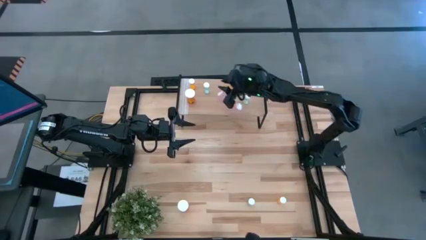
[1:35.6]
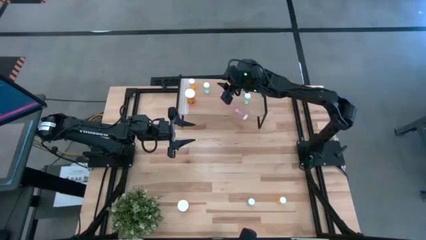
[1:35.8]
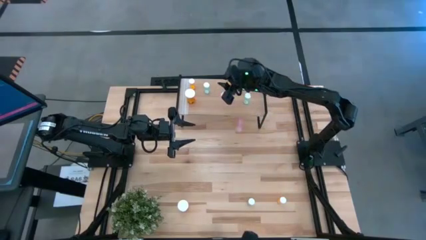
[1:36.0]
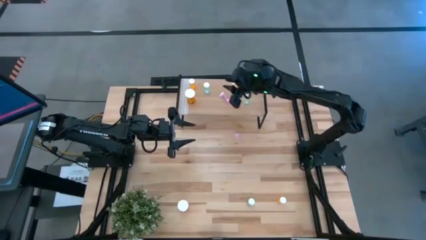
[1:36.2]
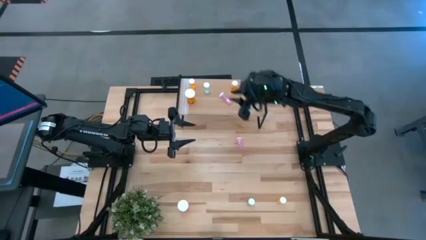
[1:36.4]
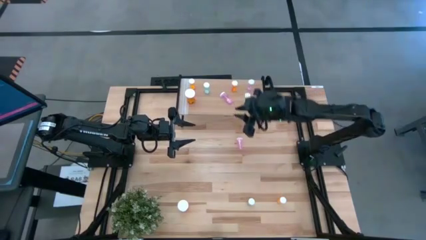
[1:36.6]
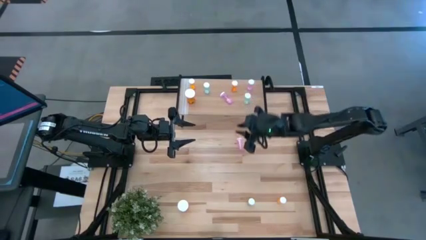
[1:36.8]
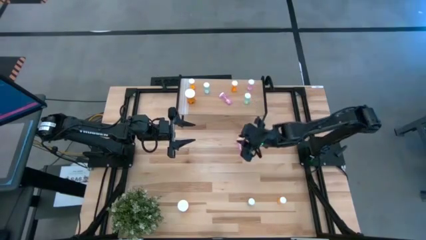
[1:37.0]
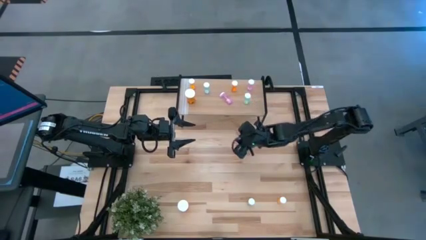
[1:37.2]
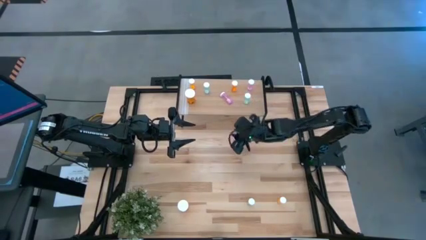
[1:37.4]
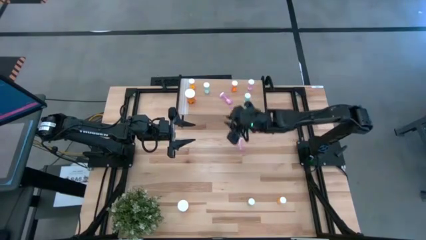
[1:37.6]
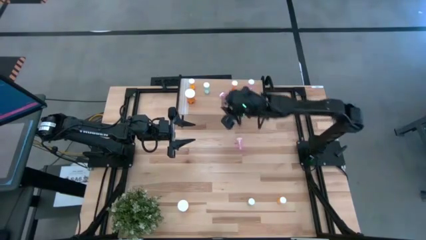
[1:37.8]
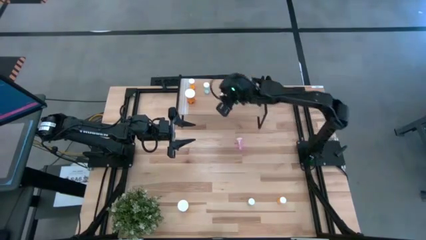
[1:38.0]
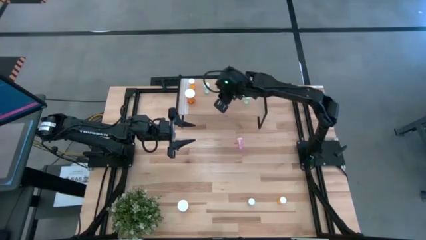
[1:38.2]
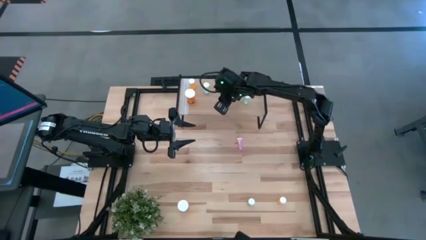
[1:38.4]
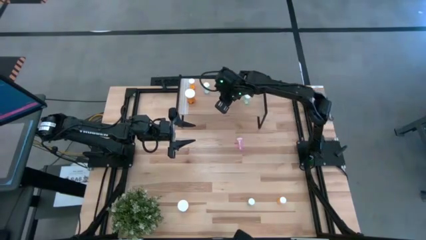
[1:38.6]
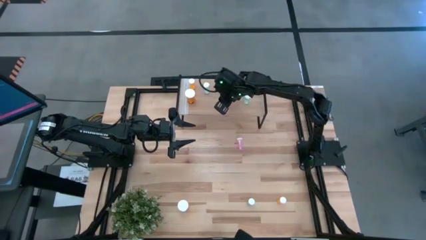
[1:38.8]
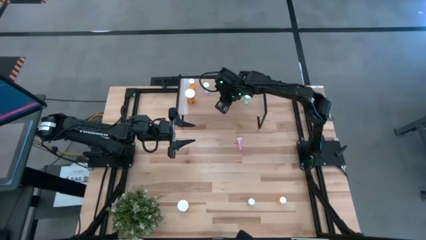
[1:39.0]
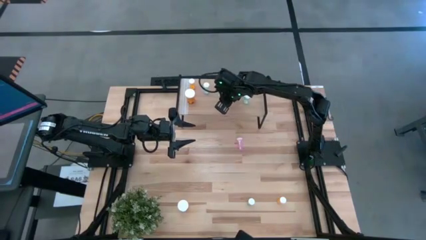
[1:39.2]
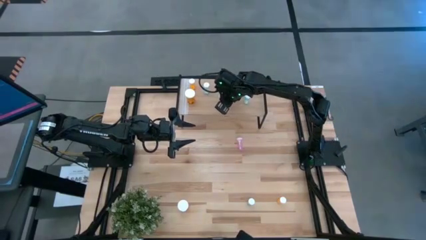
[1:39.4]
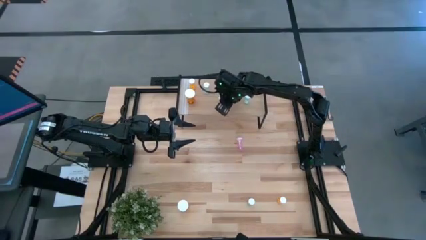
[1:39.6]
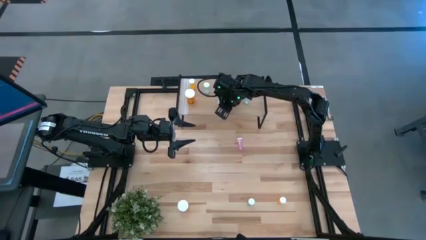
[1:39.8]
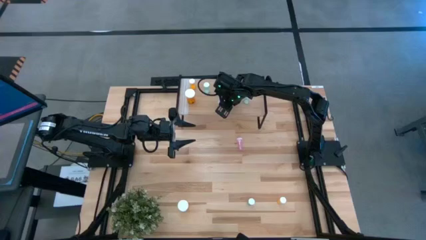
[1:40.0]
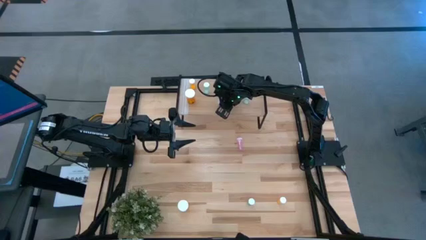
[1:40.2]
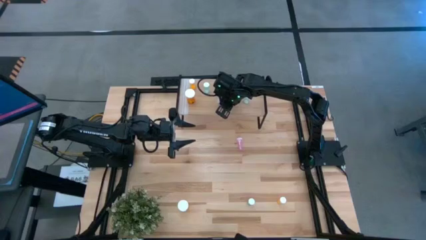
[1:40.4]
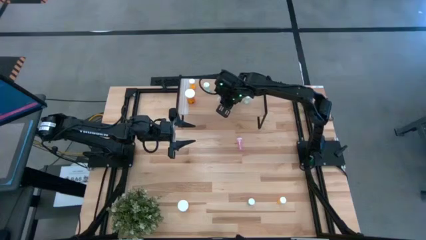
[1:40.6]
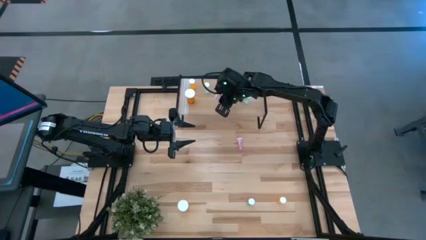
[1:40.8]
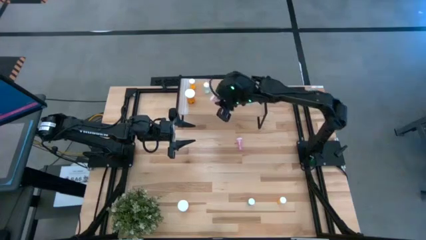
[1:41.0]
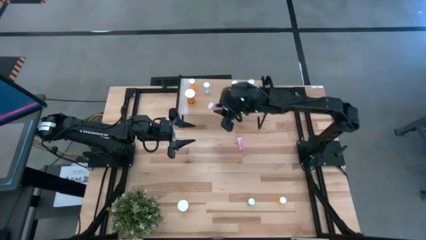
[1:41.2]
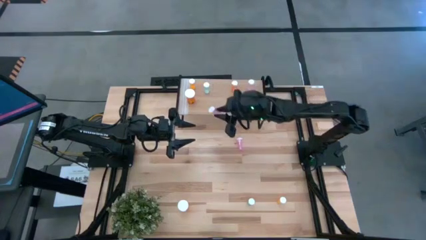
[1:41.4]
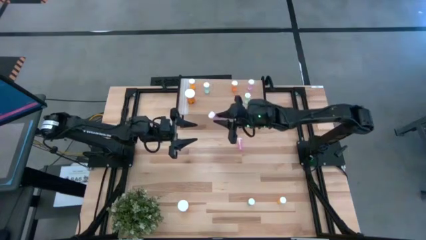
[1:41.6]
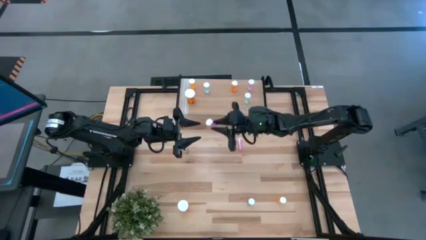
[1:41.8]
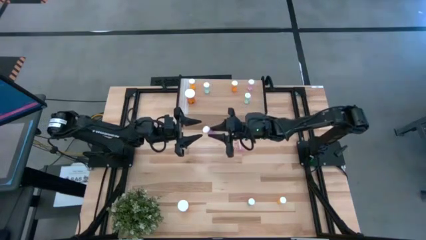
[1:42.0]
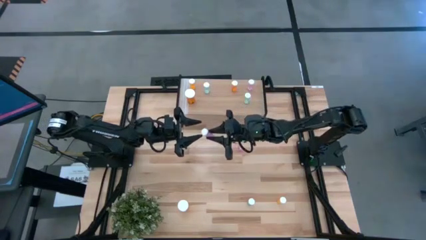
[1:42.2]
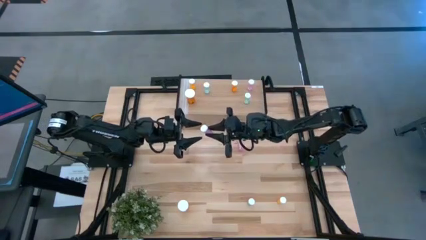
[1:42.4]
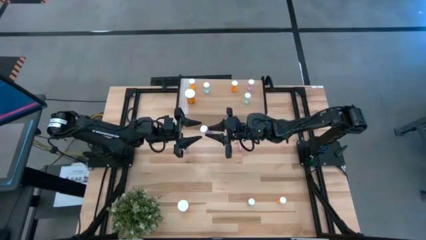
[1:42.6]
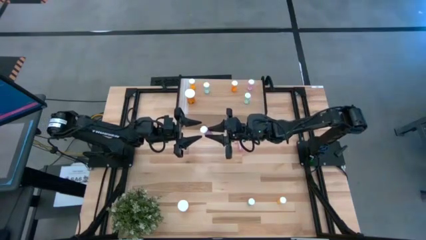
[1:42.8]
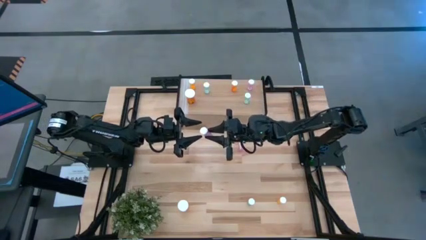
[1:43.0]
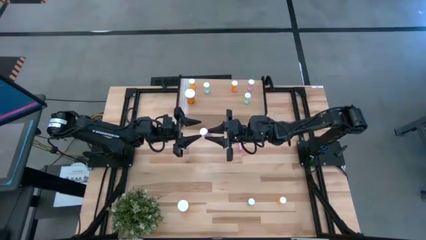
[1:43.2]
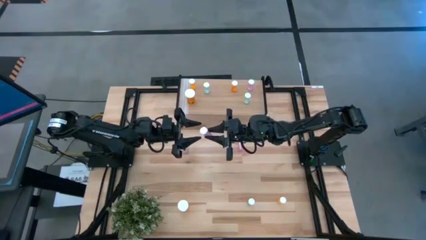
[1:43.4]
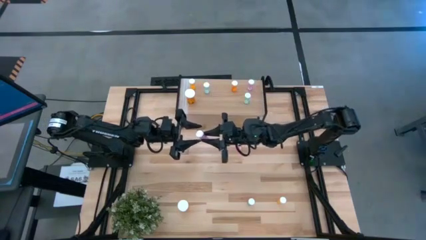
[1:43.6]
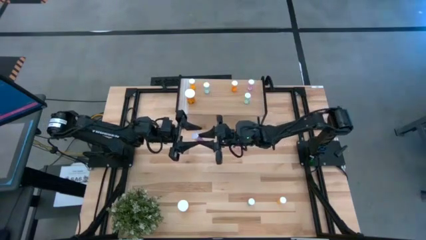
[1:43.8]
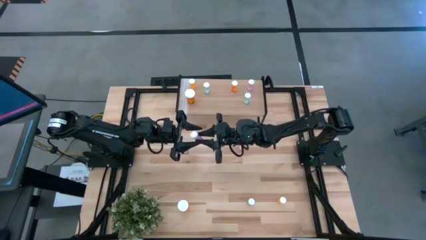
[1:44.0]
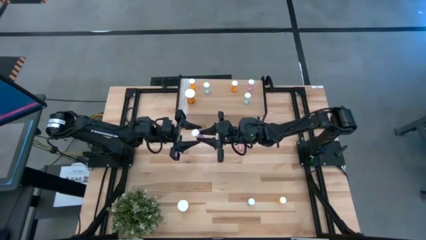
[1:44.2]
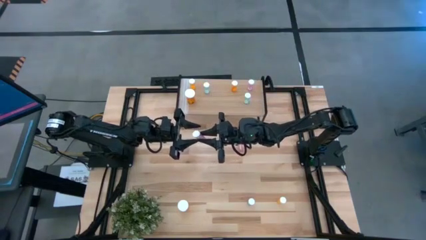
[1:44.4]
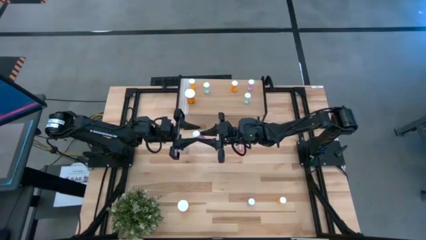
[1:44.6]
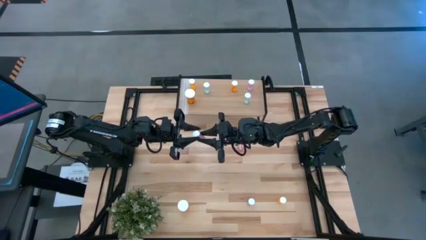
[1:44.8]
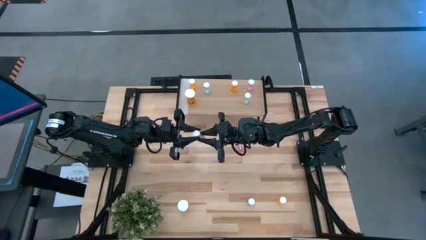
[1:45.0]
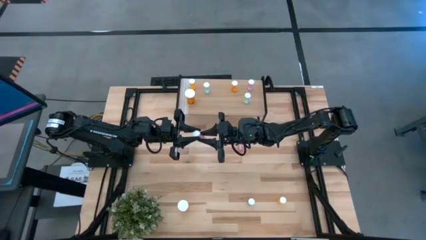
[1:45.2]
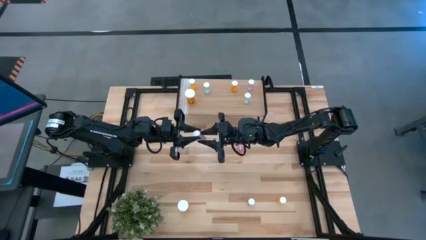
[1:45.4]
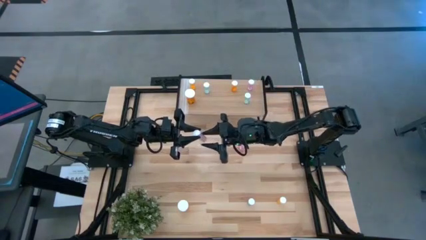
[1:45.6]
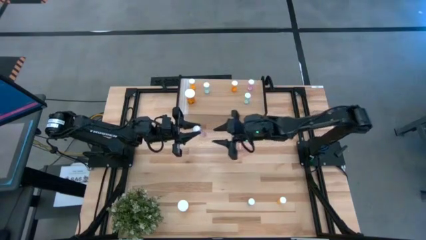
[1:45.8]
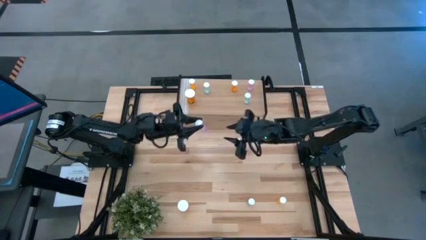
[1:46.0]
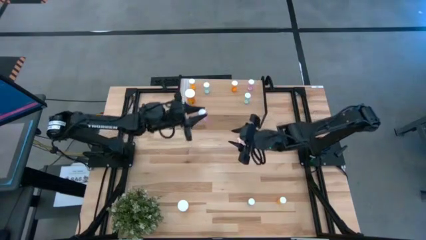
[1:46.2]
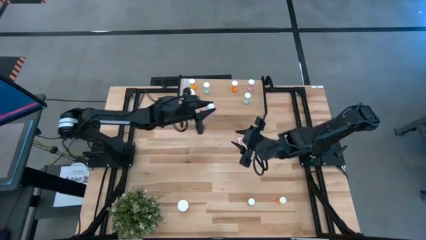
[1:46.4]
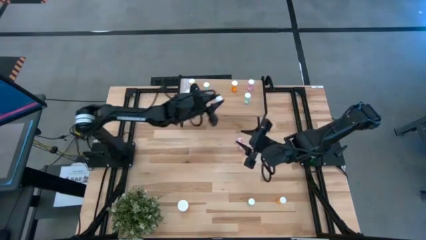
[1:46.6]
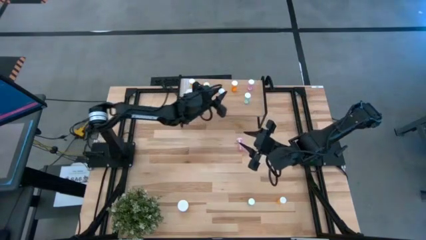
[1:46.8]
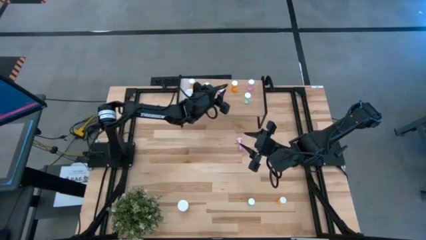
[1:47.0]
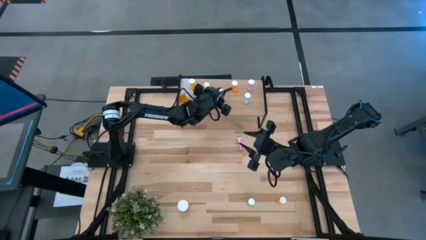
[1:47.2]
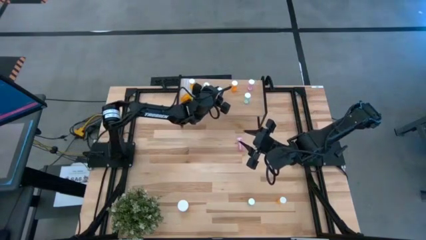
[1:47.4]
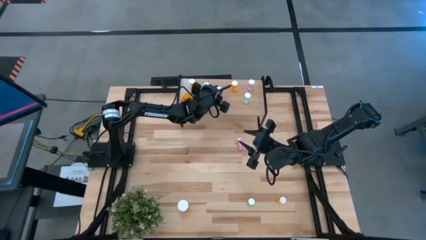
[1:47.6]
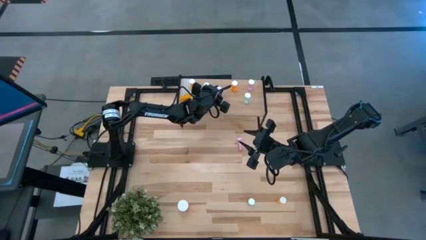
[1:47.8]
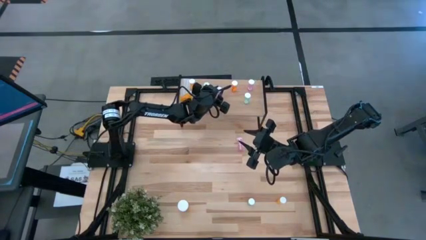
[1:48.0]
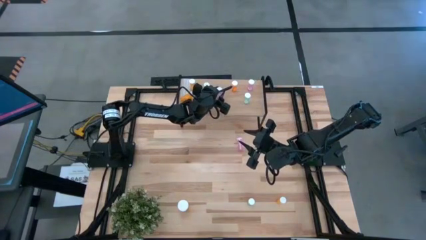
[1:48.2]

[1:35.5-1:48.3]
Task: Pick and place medicine bottles onto shelf by color
Put the pink small pill bottle on the shelf
